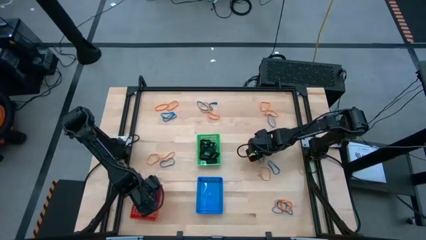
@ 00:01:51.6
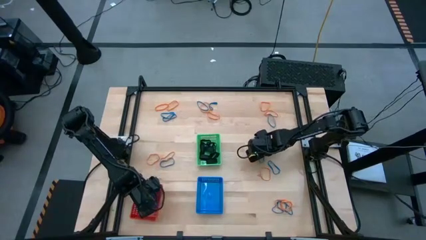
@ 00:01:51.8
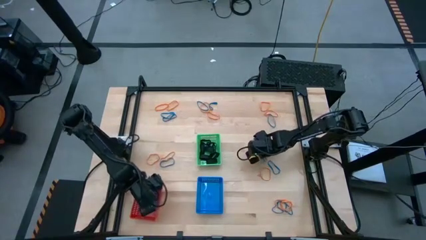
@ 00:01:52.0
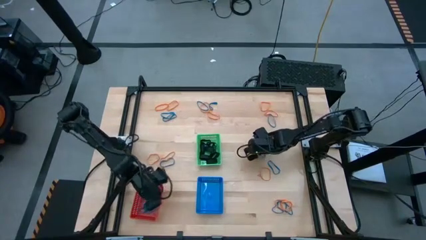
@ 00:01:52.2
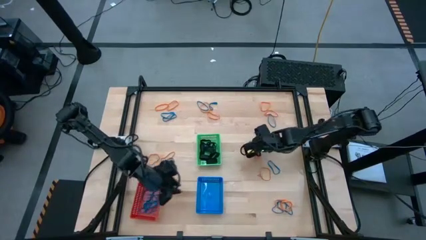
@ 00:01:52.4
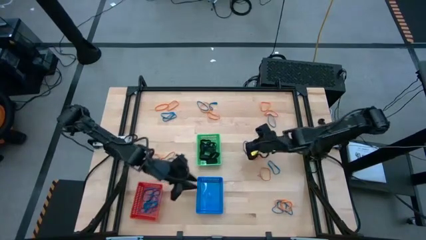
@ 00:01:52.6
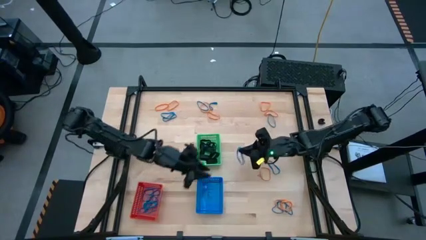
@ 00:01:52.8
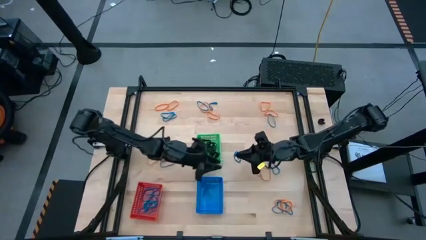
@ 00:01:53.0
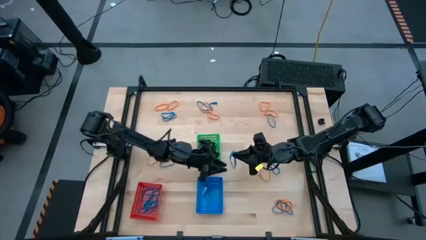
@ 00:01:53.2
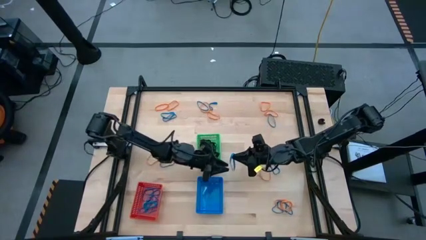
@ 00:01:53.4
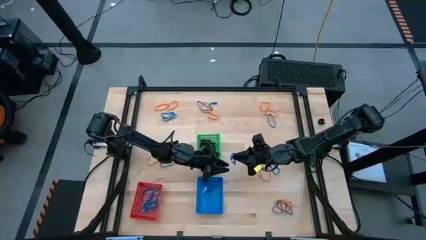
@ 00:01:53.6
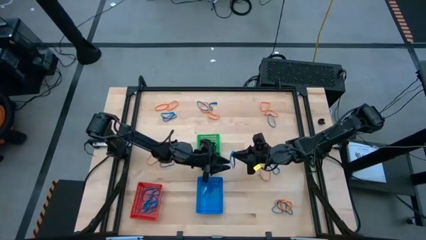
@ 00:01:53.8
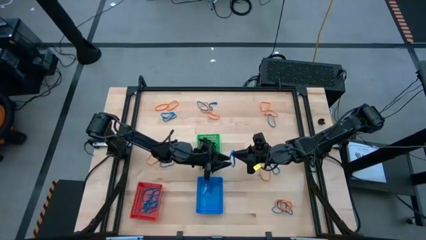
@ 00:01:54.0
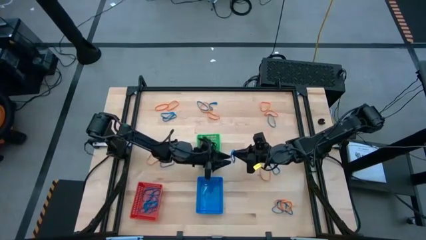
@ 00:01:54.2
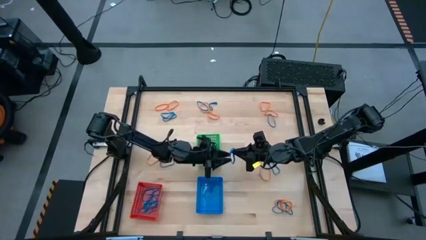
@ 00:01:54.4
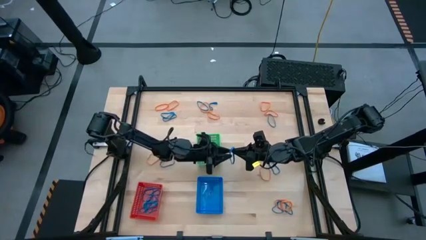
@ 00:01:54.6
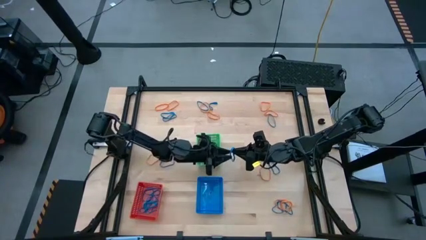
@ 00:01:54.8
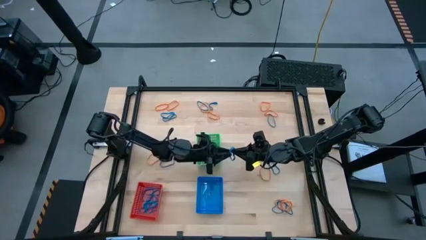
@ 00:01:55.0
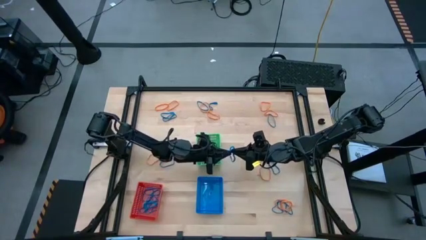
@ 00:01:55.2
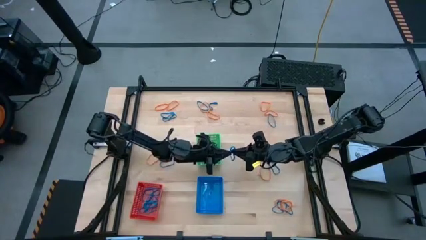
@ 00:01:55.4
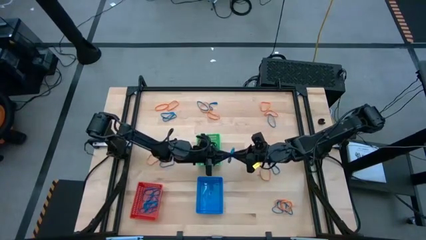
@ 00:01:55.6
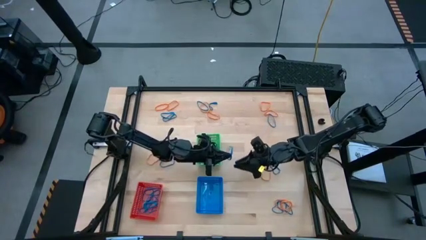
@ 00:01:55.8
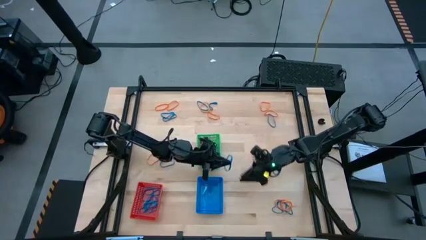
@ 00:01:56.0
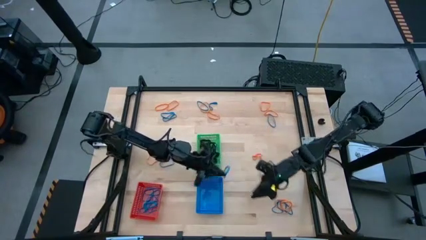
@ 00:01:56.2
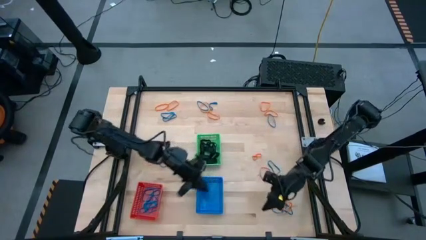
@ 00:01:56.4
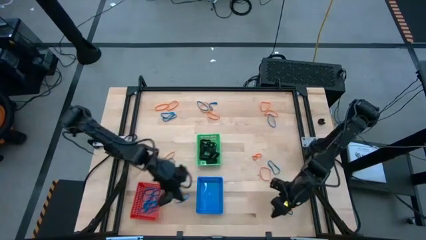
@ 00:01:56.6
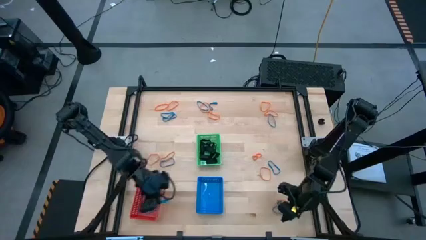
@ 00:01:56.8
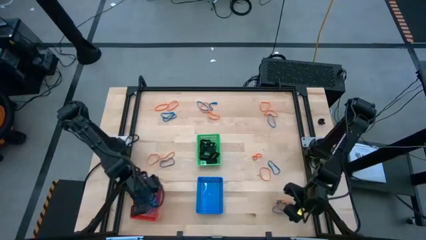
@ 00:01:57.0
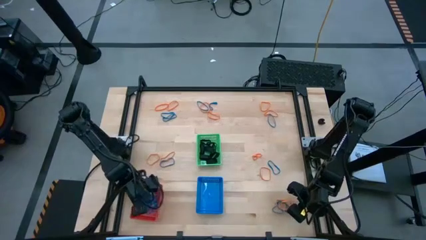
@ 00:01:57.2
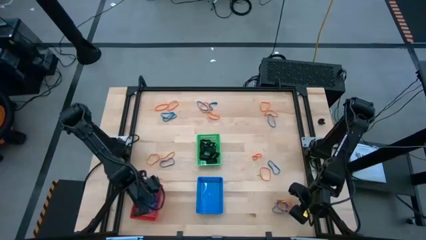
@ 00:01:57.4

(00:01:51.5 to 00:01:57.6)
Task: Sort rubber bands into baskets
Put the blue rubberband into the red bin

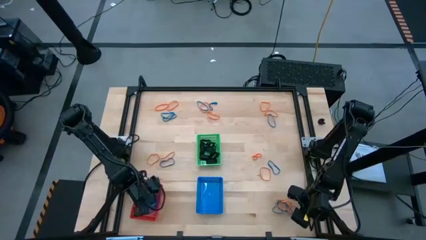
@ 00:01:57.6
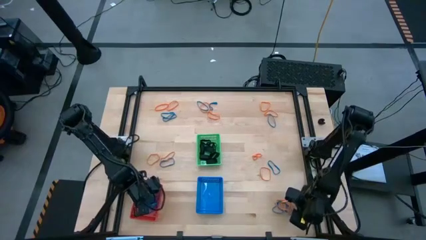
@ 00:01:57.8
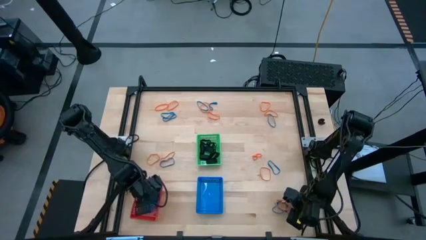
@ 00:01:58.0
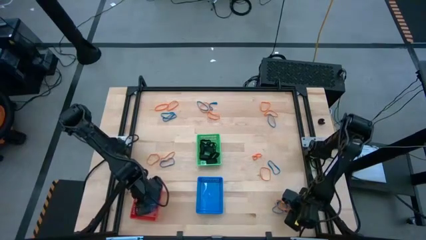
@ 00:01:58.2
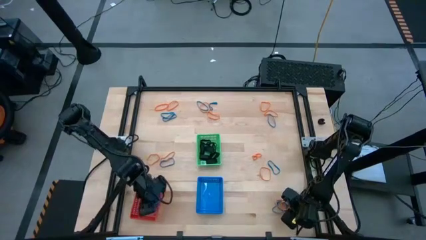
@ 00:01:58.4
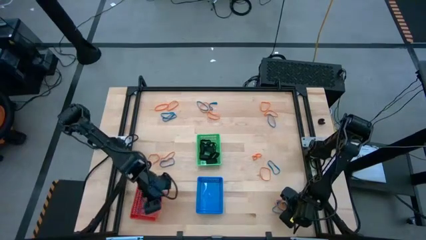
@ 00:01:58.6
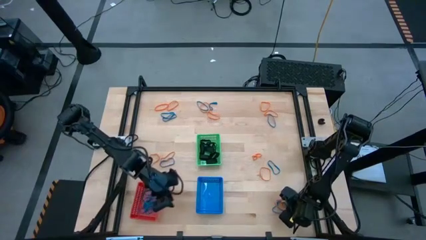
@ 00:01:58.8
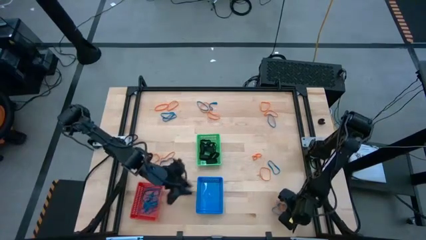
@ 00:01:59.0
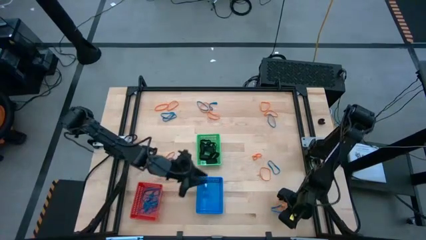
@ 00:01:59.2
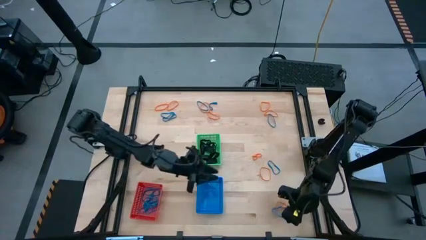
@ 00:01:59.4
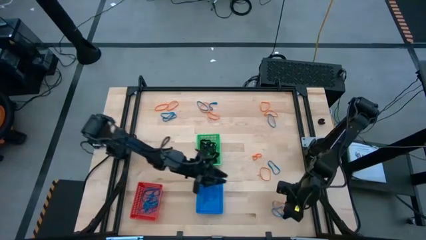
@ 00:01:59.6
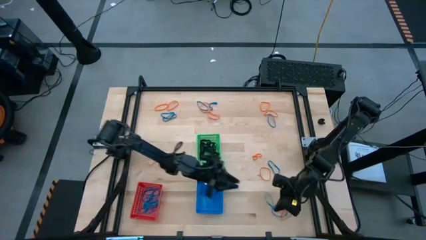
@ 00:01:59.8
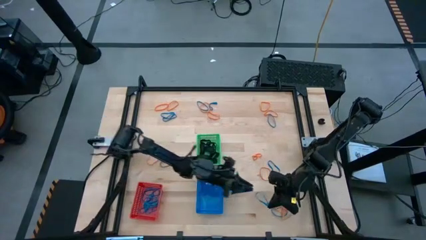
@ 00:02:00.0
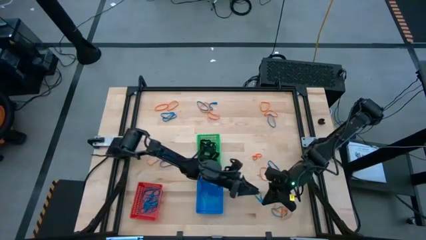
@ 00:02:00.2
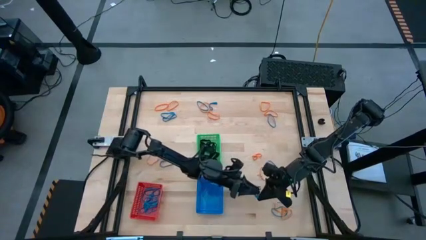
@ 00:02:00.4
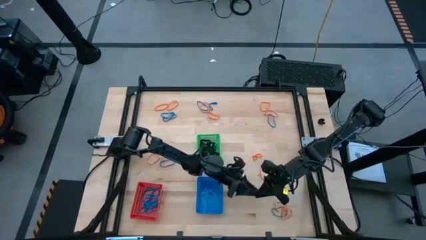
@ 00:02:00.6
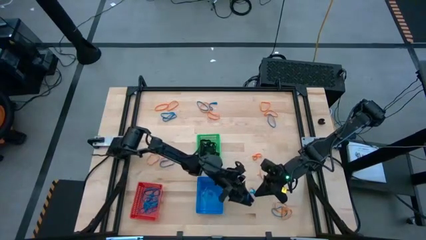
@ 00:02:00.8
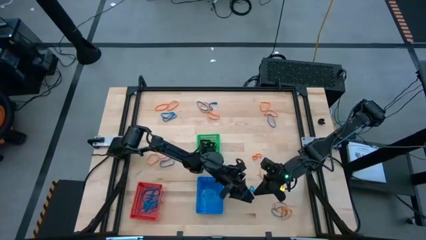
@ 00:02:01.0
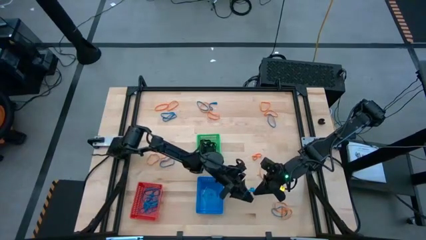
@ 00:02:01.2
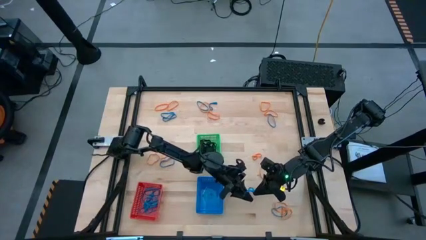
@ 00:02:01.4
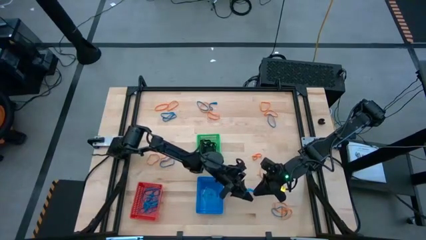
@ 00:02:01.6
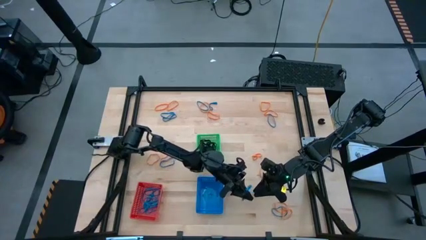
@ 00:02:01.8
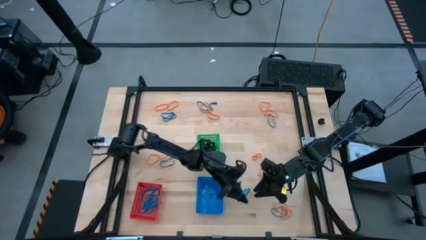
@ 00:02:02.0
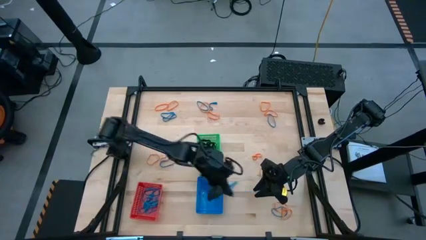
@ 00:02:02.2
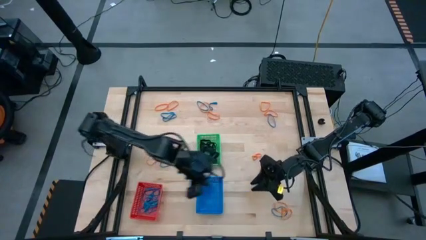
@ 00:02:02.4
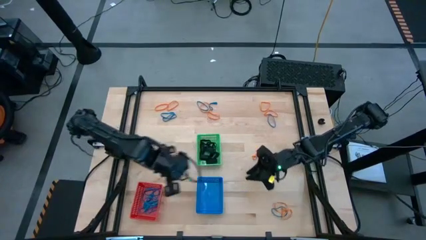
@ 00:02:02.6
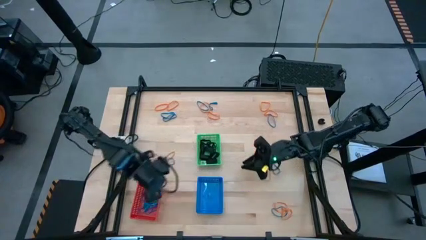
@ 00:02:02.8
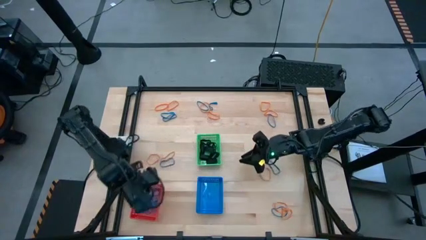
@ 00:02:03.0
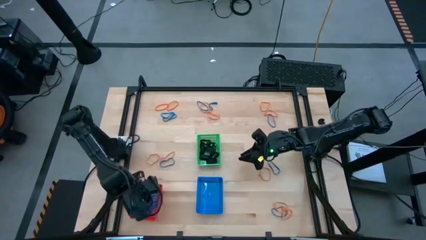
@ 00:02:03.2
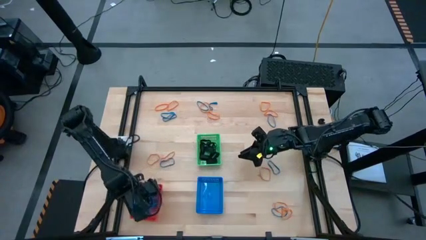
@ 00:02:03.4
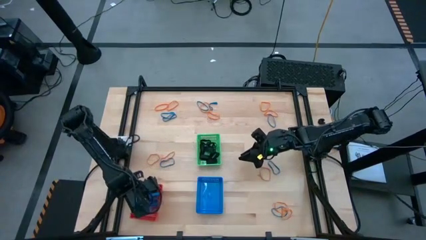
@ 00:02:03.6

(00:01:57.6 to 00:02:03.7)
Put the blue rubberband into the red bin

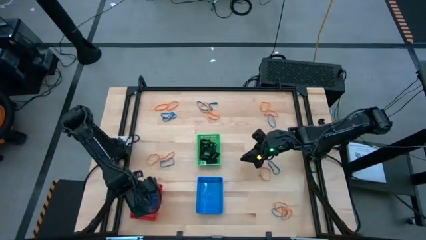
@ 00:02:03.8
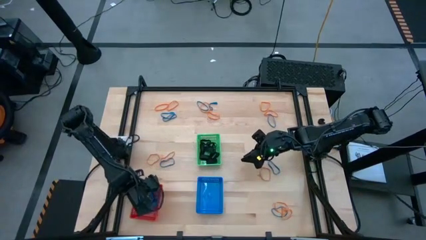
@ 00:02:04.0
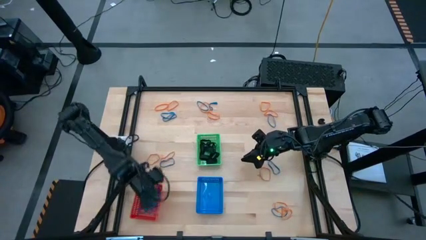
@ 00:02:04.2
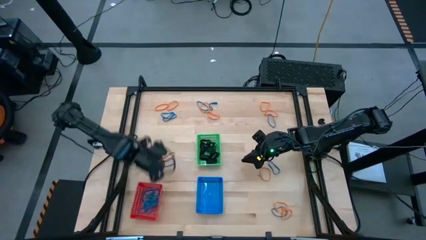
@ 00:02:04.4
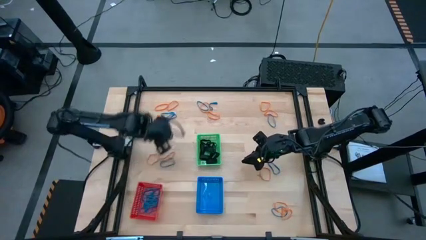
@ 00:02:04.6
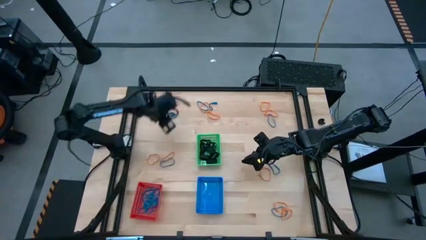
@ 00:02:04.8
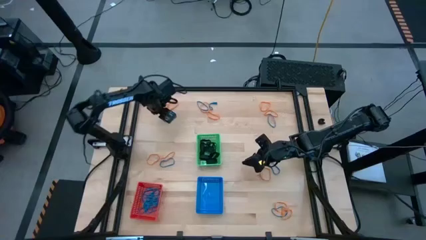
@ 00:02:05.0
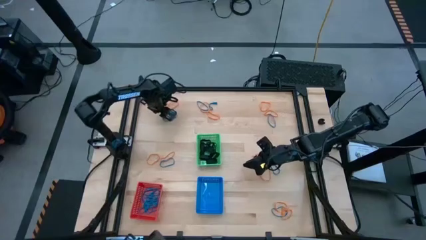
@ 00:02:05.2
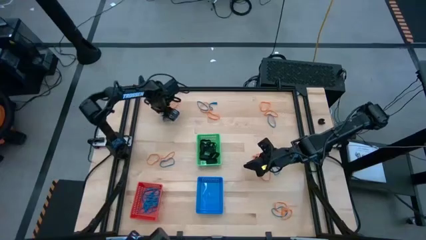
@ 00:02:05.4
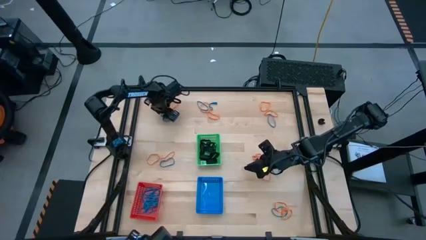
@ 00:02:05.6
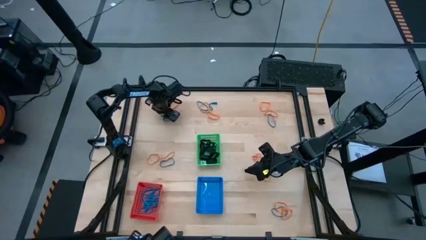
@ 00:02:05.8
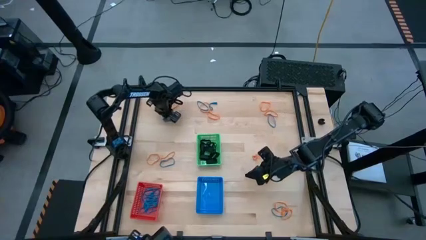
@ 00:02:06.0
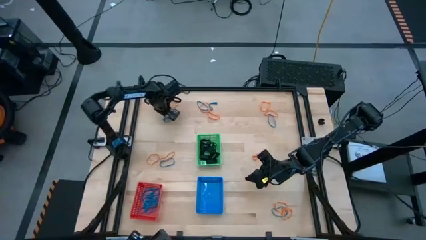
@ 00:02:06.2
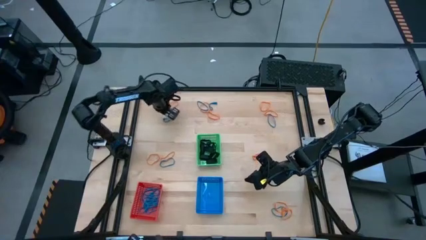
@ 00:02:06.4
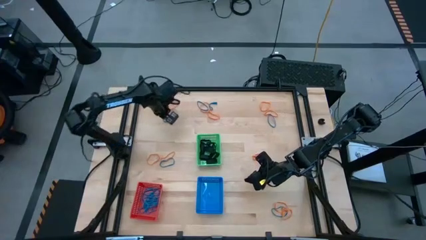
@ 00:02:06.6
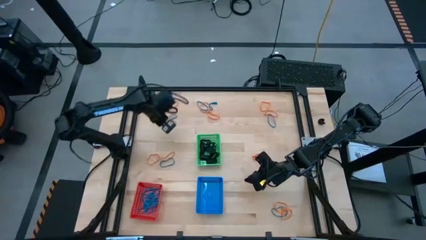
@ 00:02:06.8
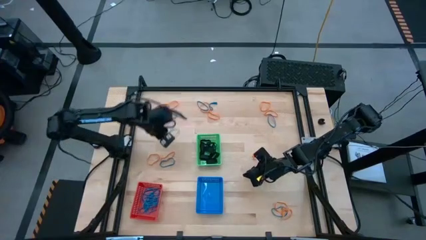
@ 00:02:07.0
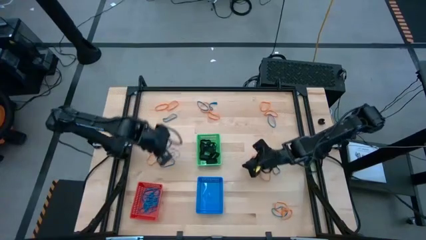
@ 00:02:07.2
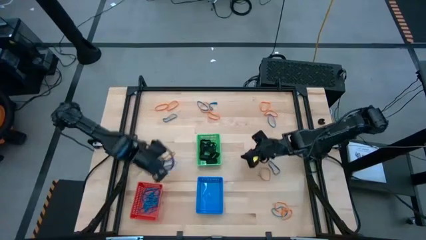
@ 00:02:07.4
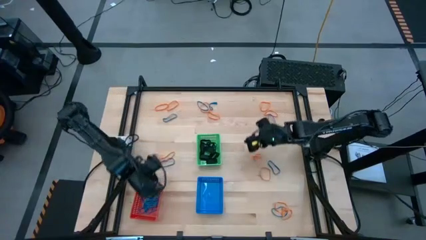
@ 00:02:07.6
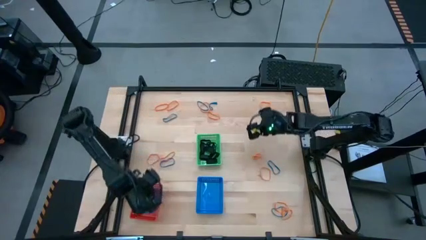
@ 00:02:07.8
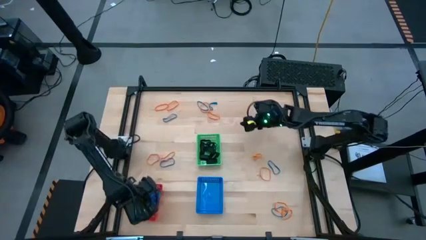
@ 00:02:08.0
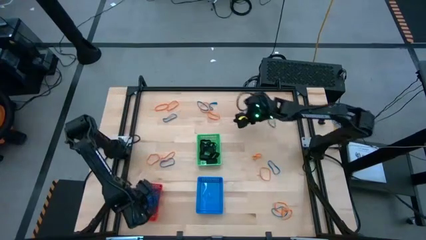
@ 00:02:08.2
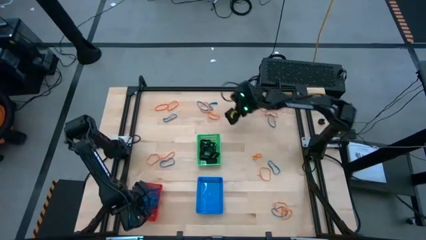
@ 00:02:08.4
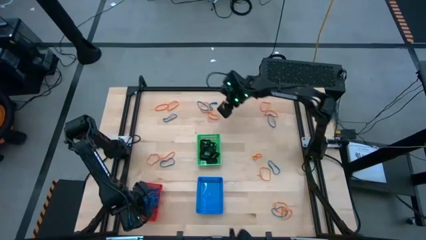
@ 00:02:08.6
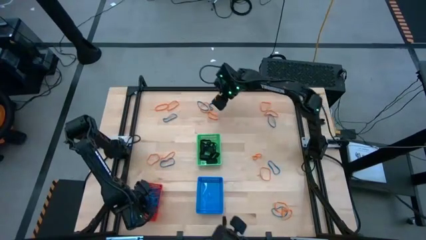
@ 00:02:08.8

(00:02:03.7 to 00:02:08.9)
Put the blue rubberband into the red bin
